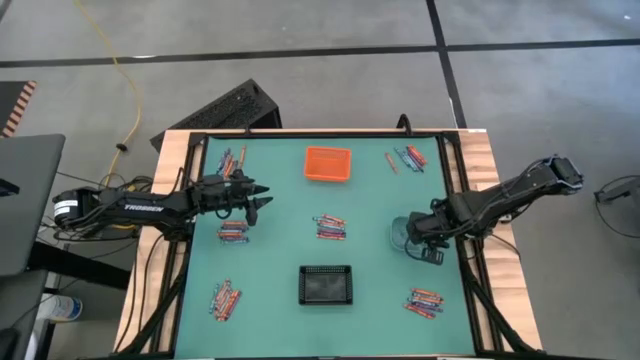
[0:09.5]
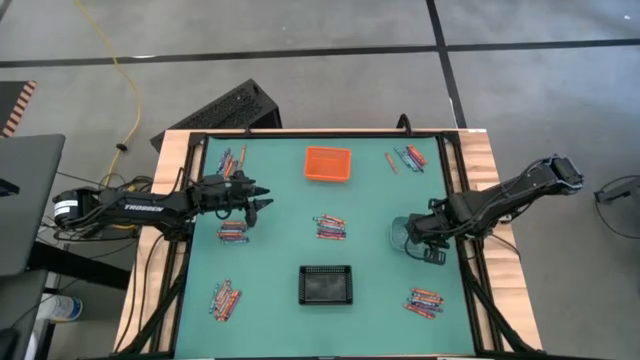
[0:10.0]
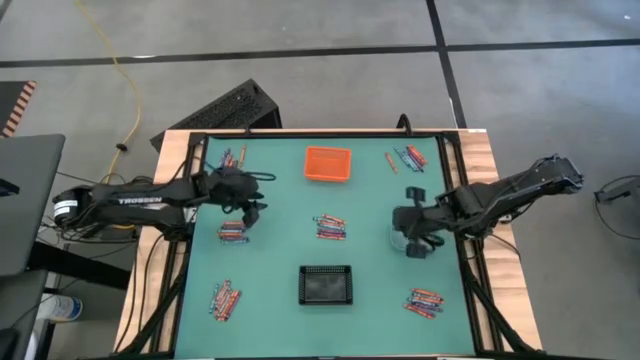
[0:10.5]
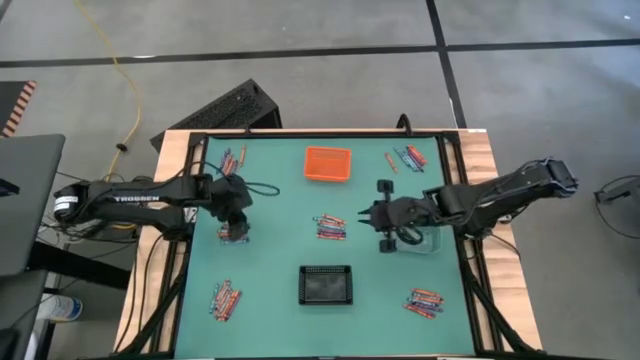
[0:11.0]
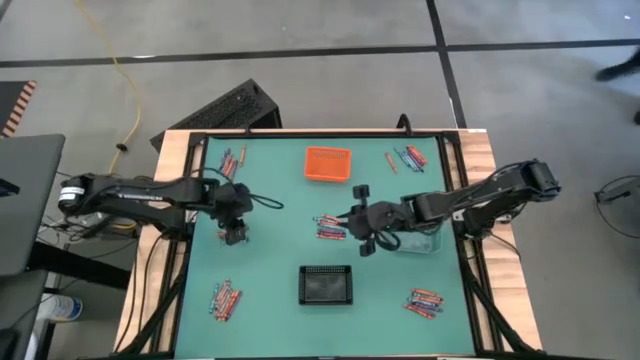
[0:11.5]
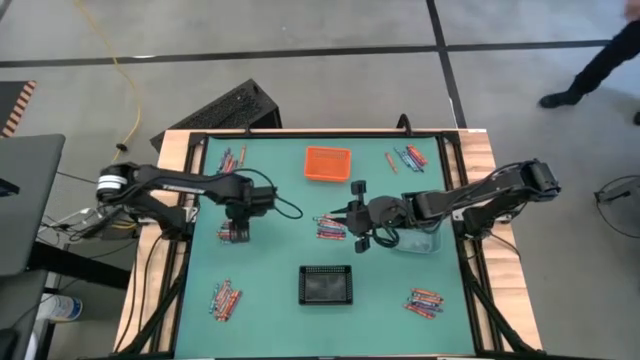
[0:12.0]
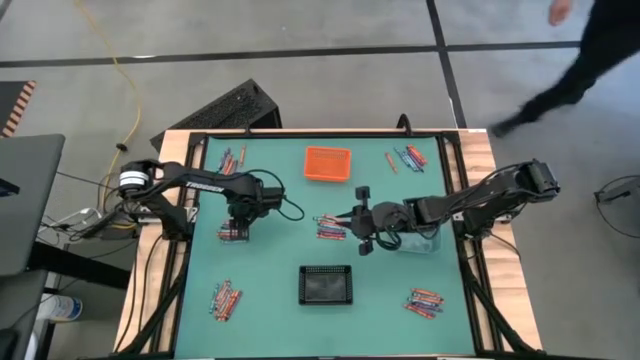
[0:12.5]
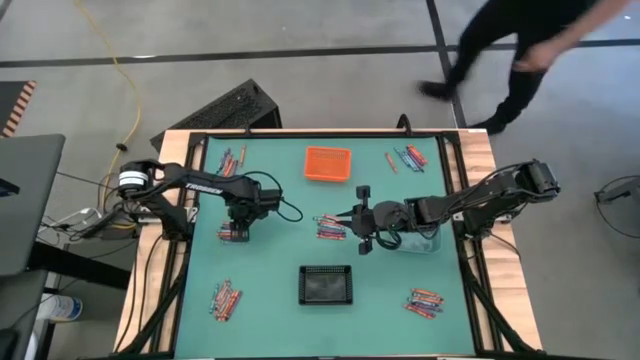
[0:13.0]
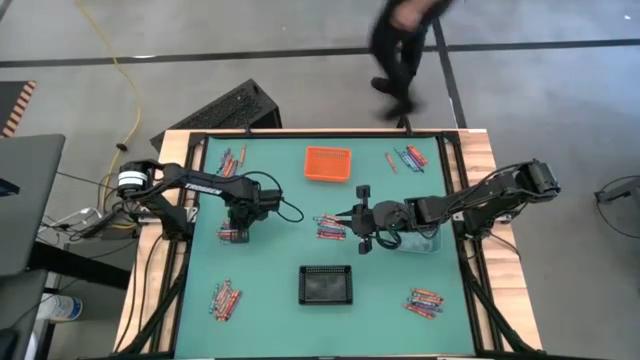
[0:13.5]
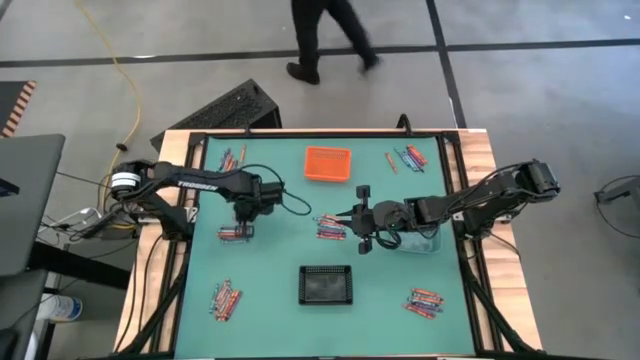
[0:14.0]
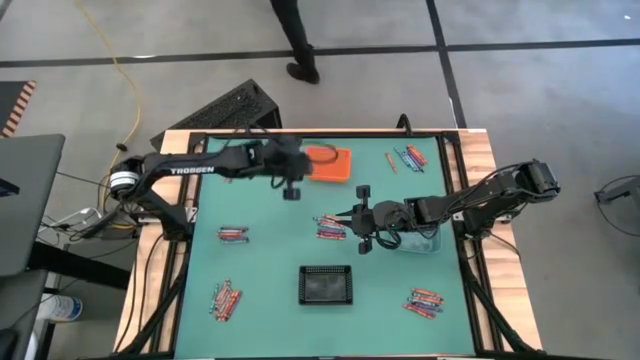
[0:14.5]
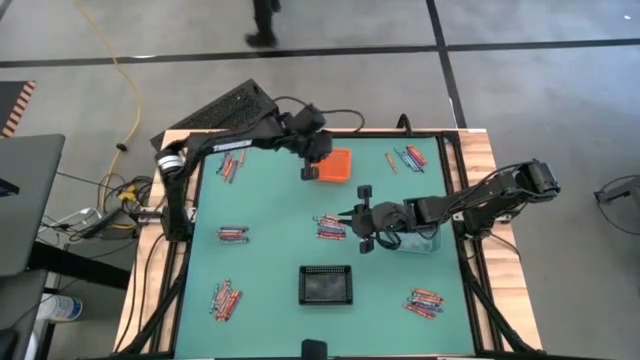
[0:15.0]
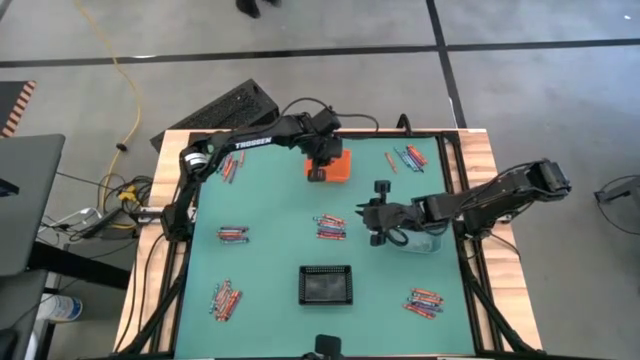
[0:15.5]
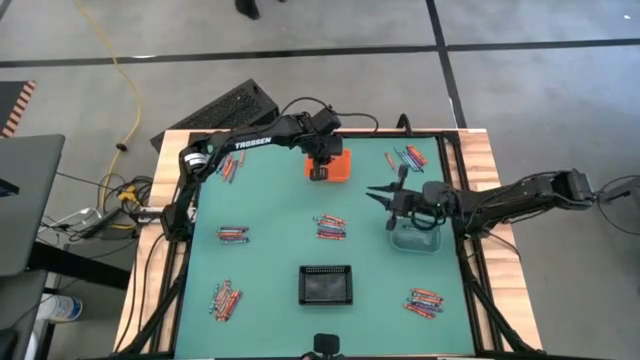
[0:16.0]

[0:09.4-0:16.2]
Task: Sort crayons
Put the orange crayon into the orange bin

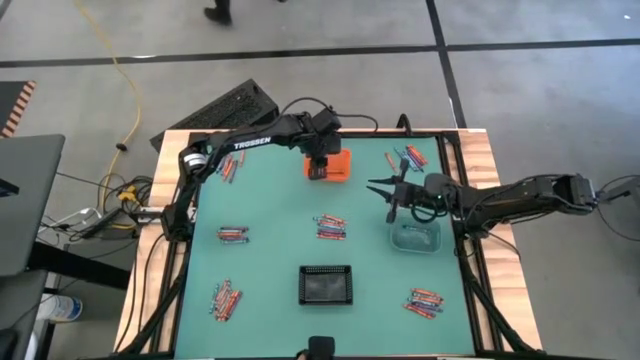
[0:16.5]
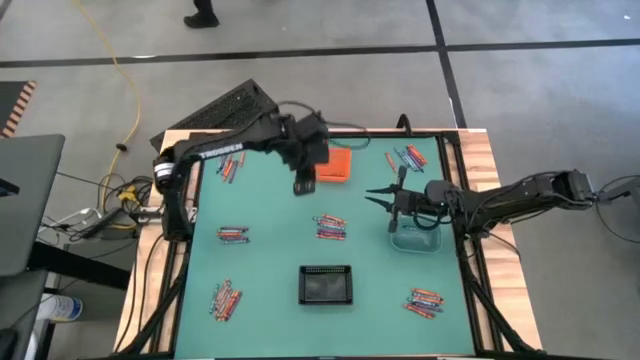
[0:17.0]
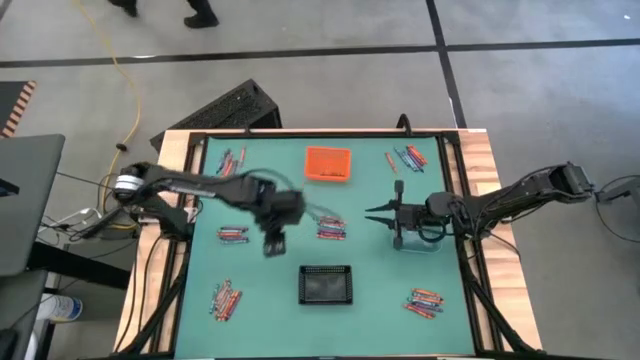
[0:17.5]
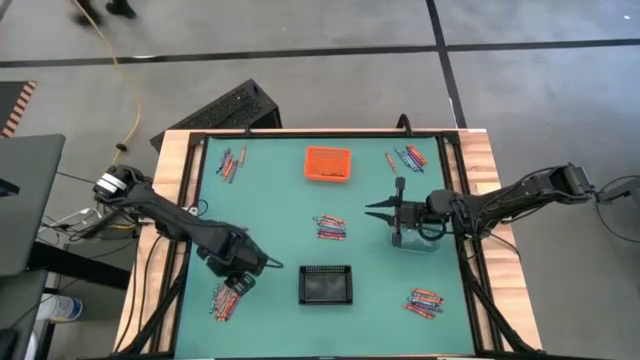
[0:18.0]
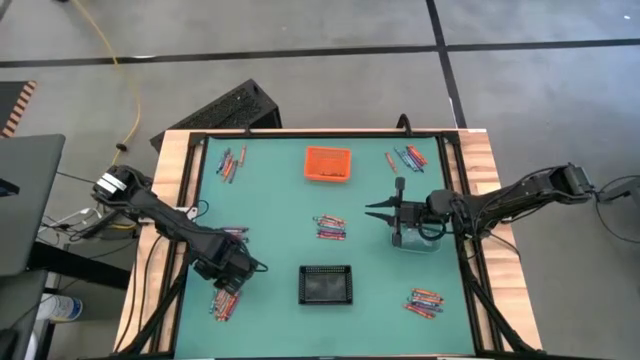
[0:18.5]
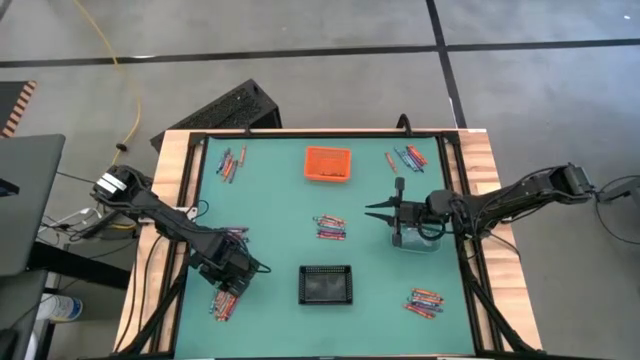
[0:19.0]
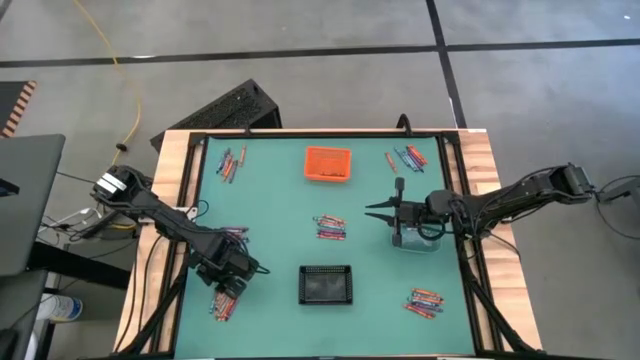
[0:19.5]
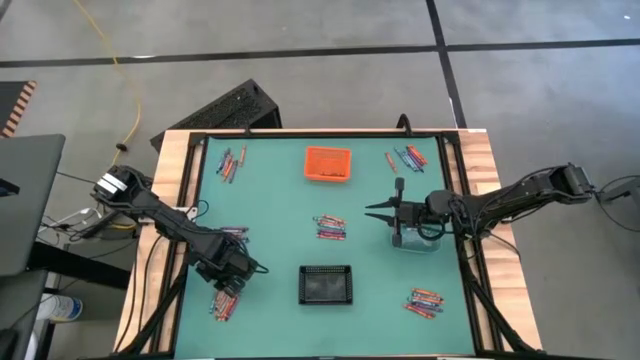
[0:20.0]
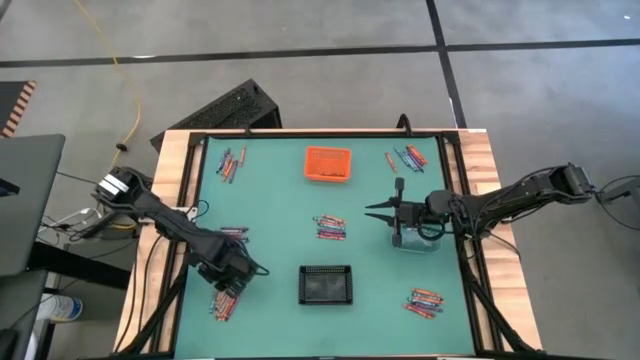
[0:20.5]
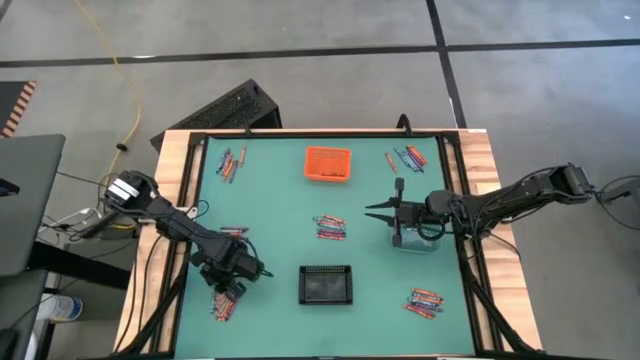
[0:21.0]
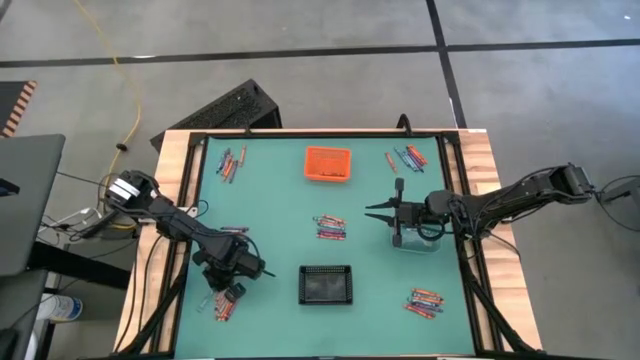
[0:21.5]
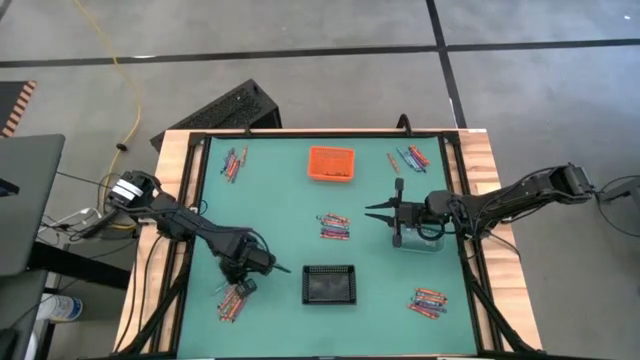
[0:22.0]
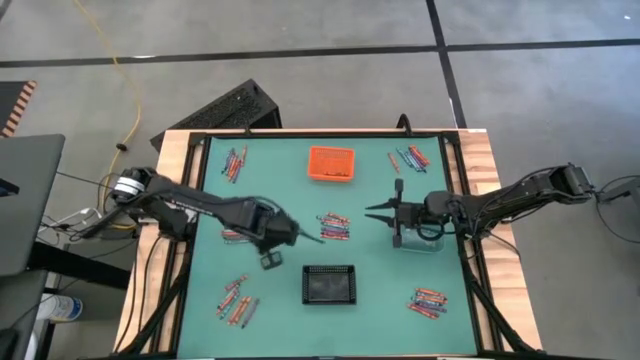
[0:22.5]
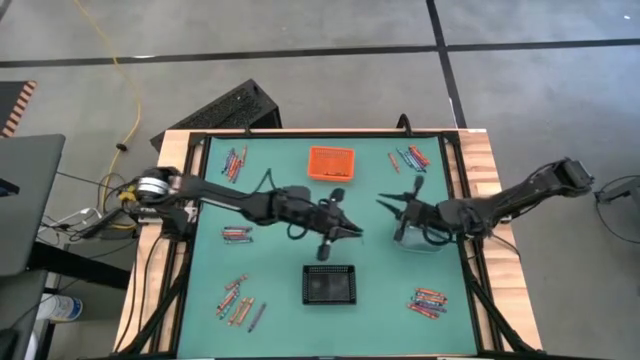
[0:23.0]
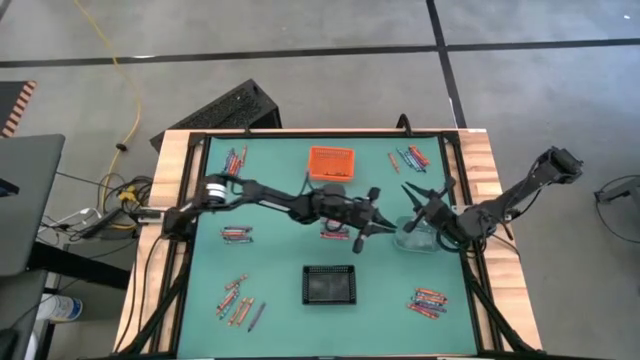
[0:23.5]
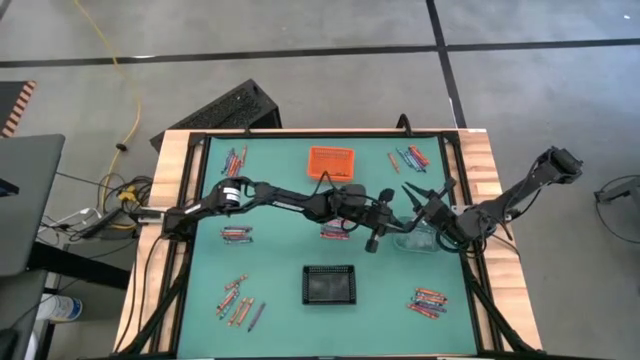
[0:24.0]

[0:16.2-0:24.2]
Put the blue crayon into the blue bin

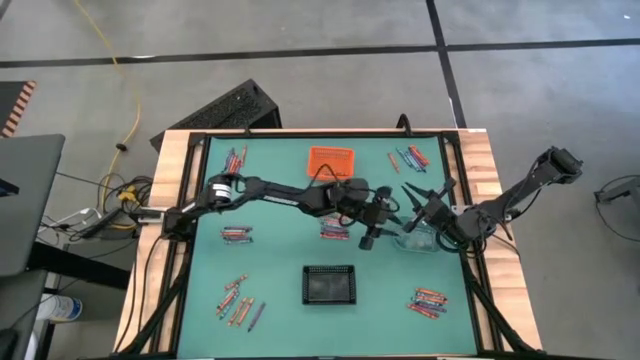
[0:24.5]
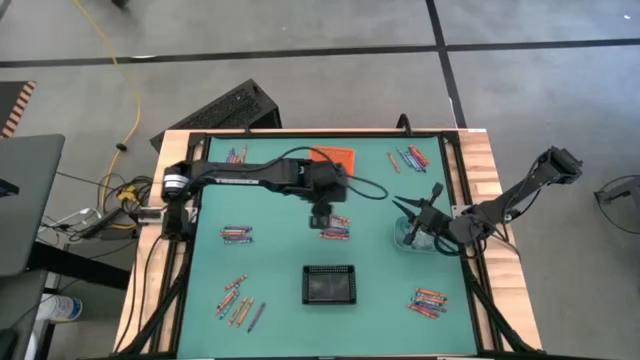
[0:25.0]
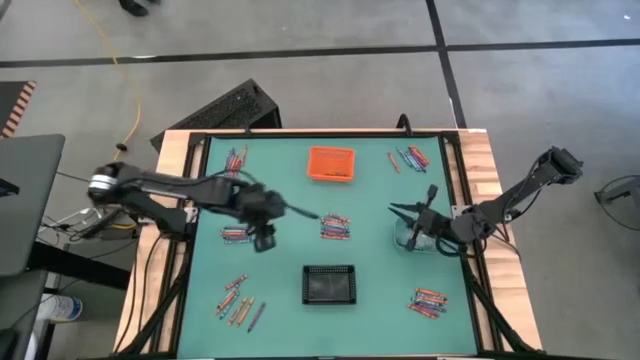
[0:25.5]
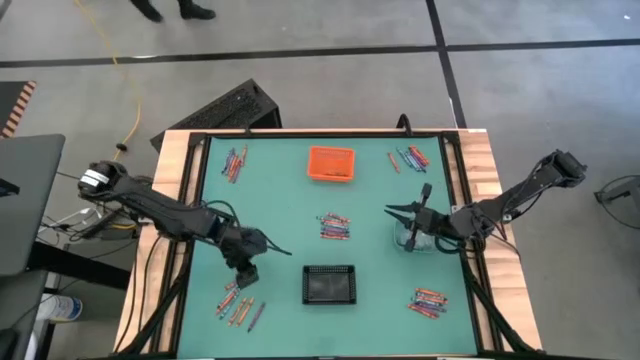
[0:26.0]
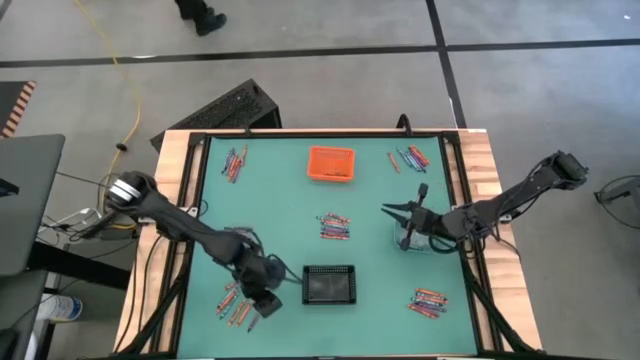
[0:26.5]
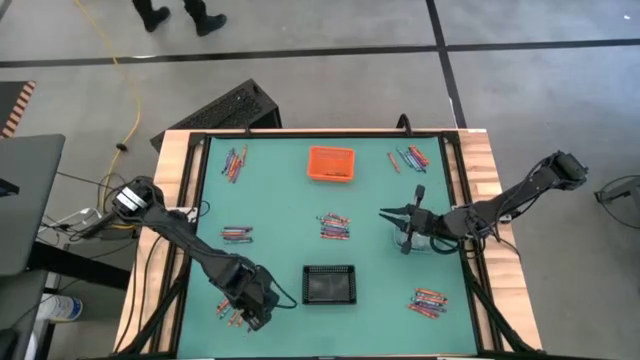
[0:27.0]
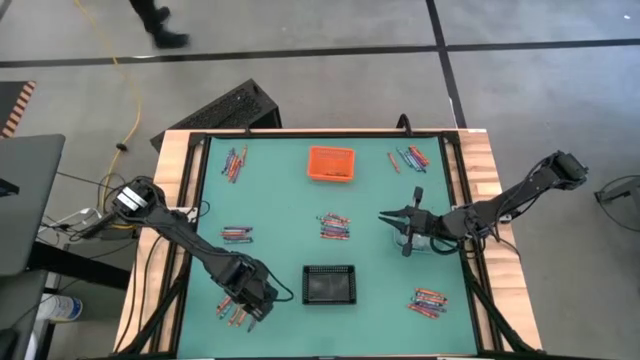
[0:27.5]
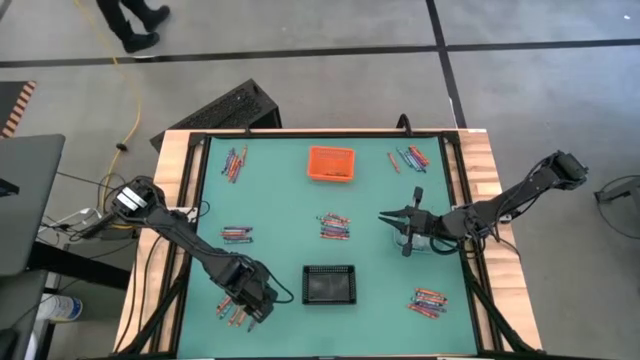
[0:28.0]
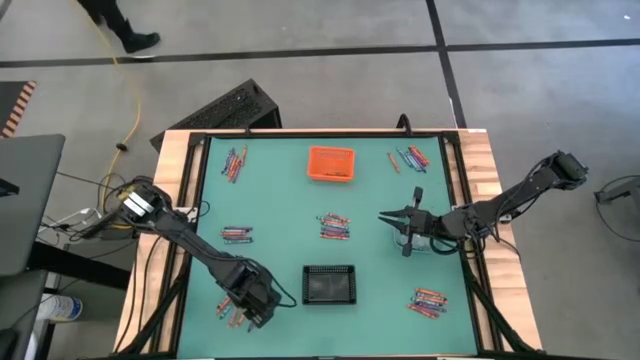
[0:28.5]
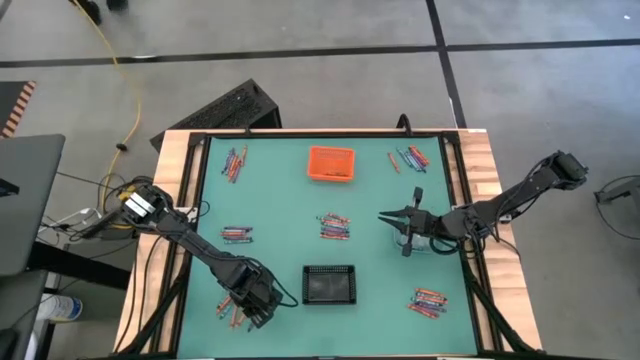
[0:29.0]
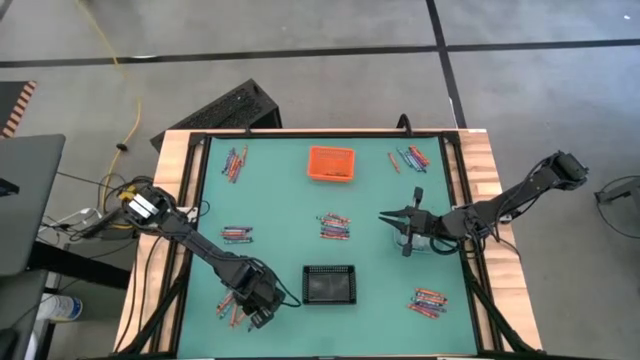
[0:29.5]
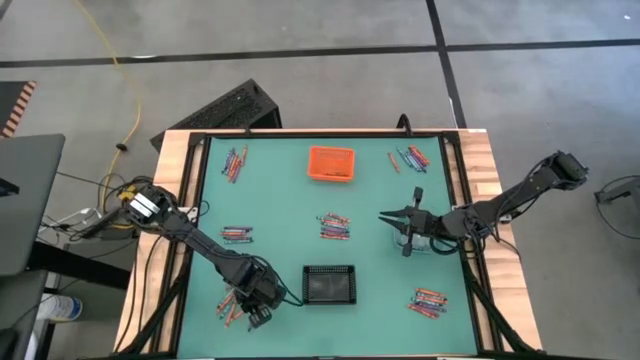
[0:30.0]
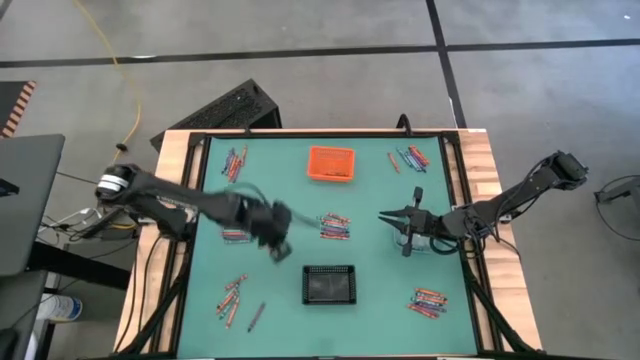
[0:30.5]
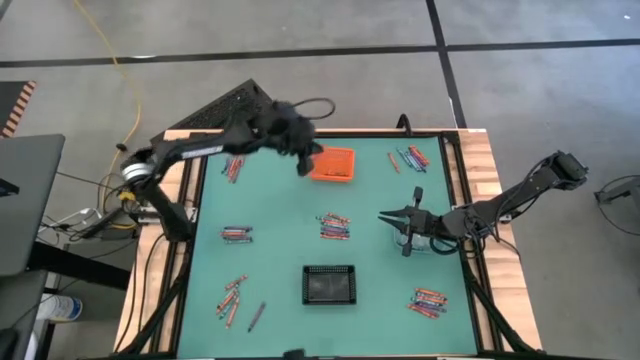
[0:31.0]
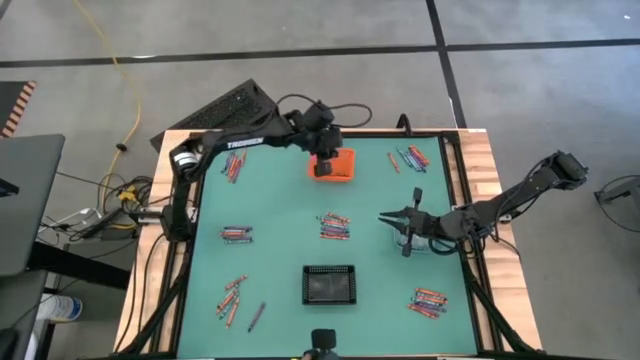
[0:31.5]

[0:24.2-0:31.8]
Put the orange crayon into the orange bin
